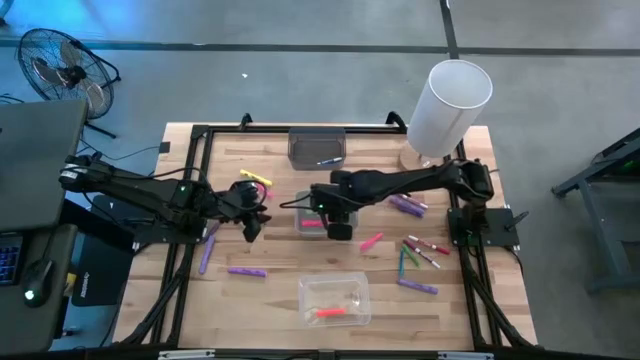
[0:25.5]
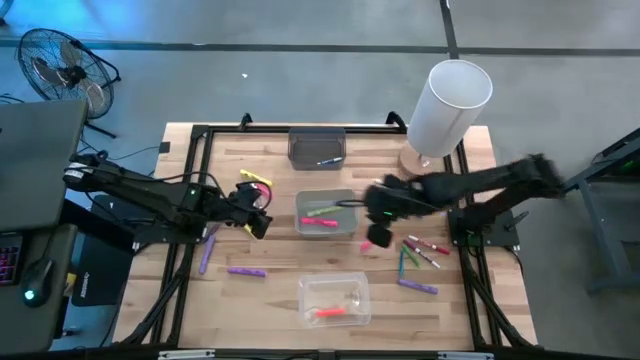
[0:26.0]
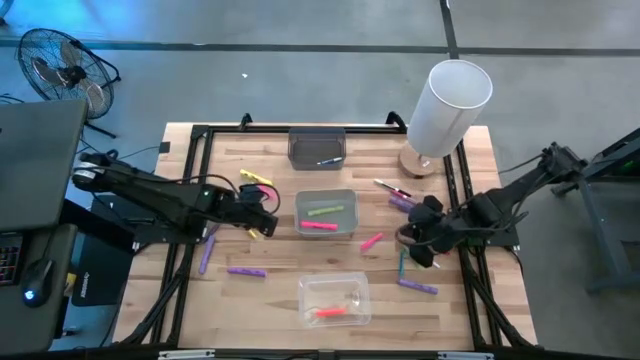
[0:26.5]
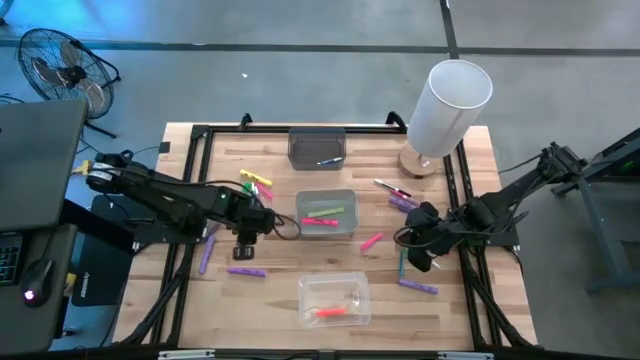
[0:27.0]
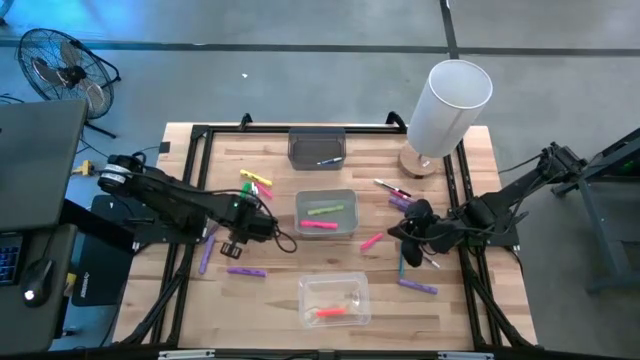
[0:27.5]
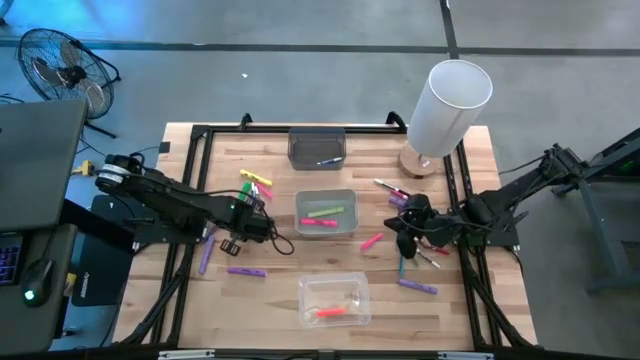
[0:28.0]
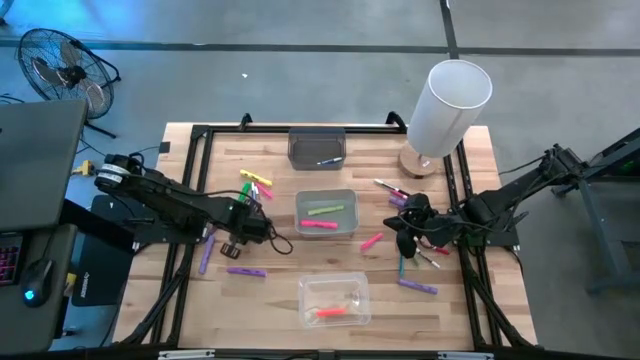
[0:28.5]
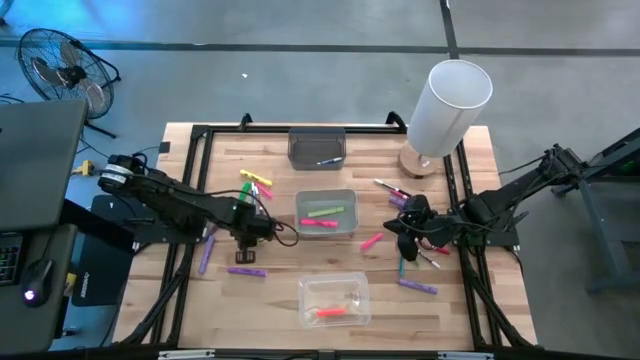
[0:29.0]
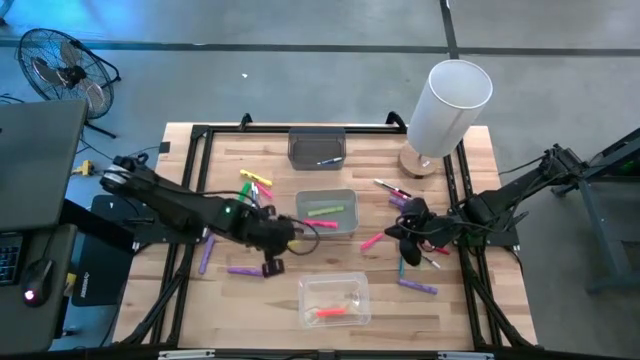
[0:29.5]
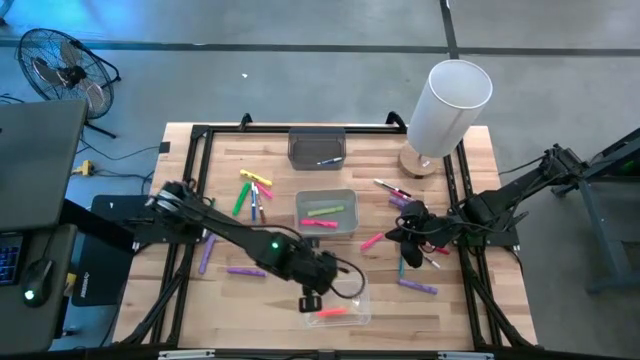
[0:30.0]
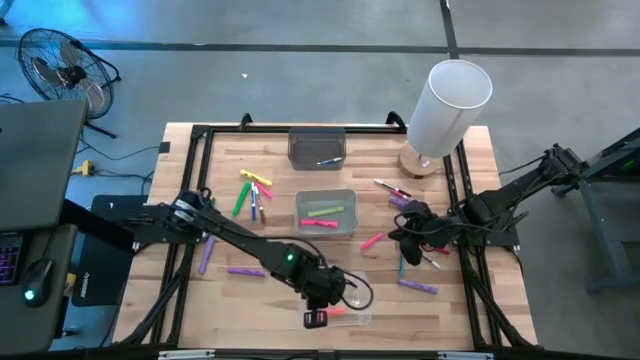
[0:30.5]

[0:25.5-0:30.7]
Task: Pick & Place Markers
Put the yellow pen into the transparent bin

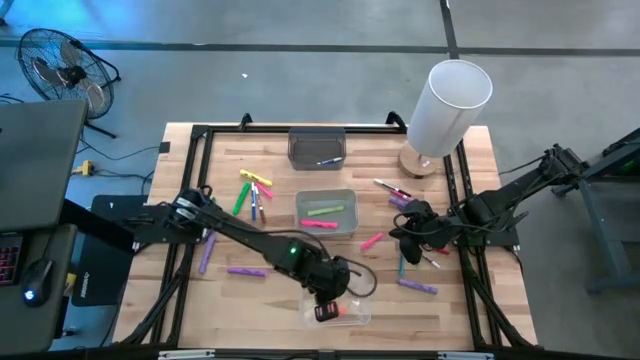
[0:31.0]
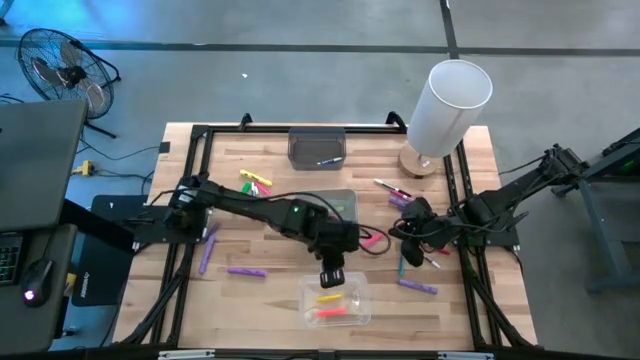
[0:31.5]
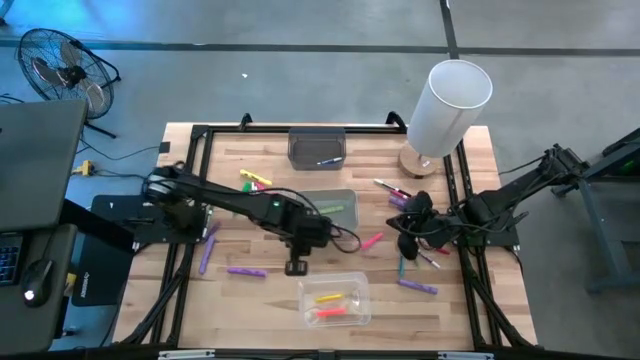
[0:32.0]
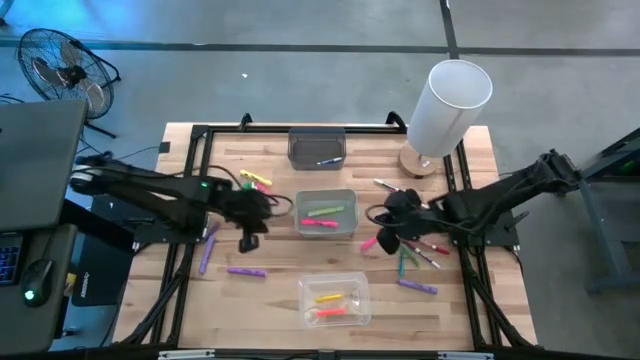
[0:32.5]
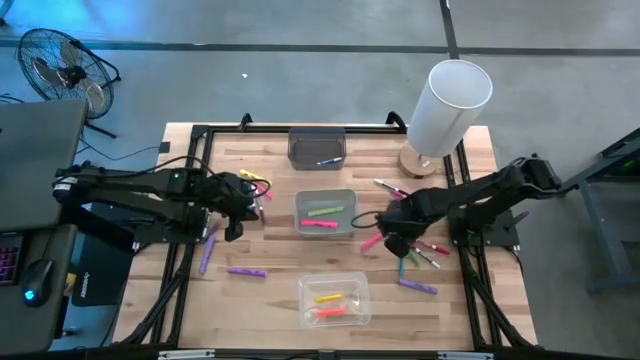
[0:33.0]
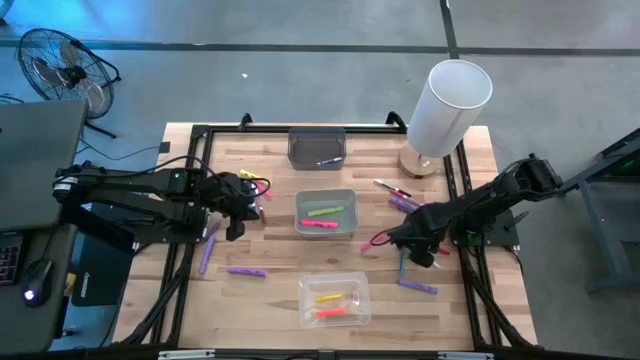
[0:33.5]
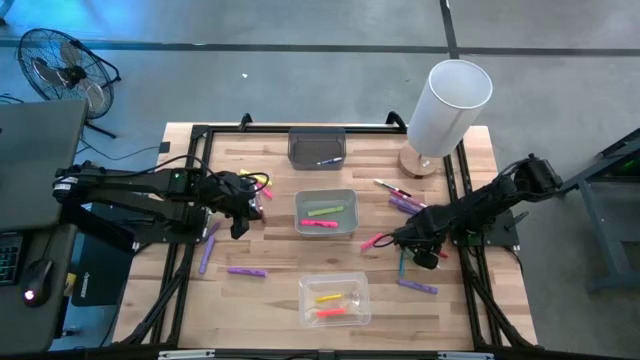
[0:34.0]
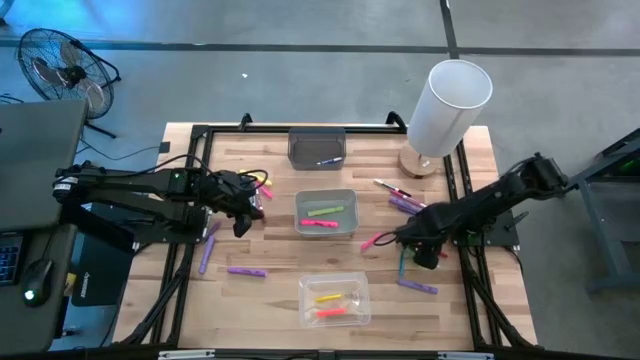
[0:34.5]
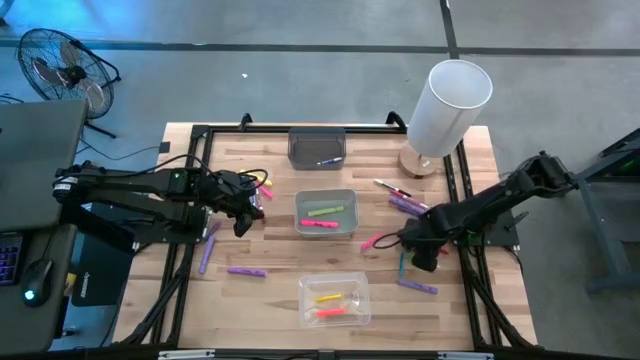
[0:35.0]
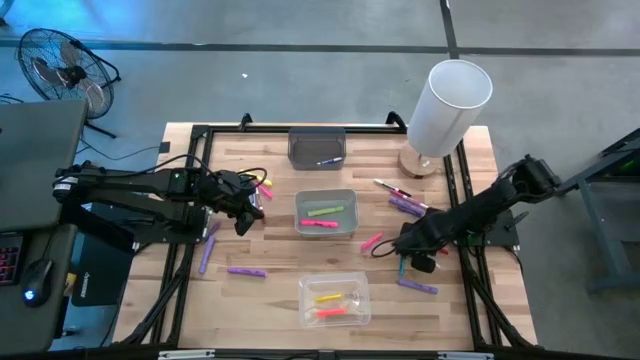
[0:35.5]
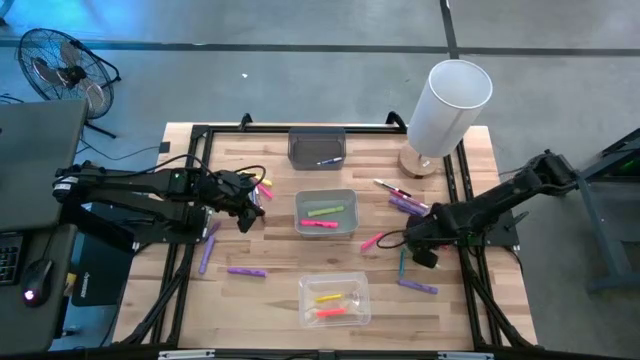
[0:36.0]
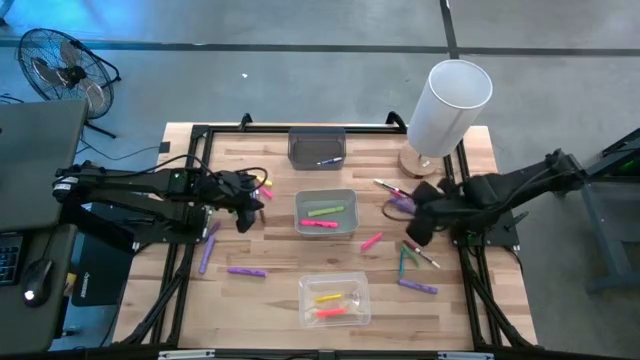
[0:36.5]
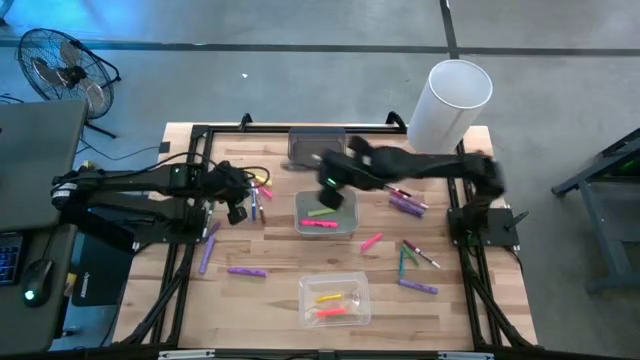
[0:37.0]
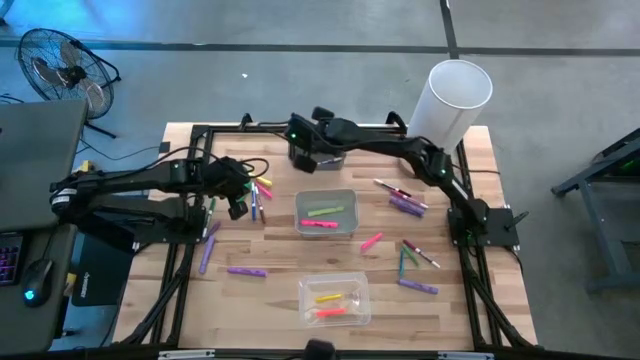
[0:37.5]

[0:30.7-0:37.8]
Put the red marker pen into the black bin

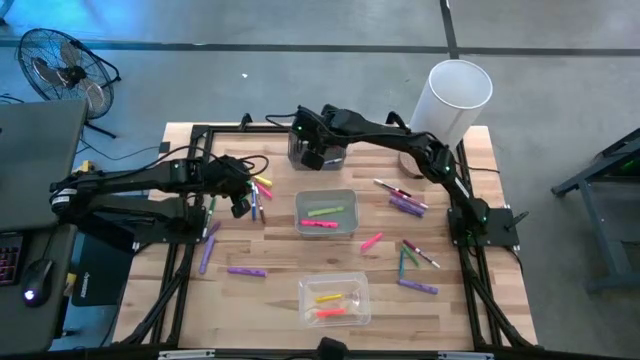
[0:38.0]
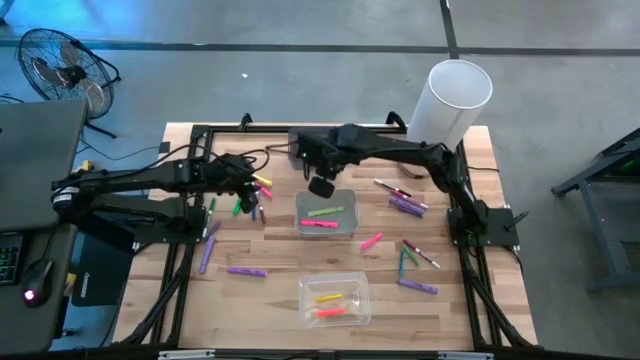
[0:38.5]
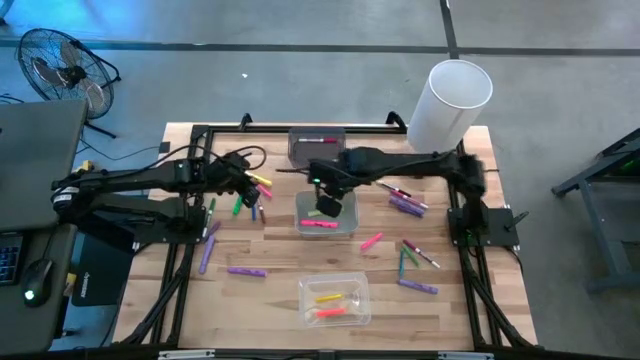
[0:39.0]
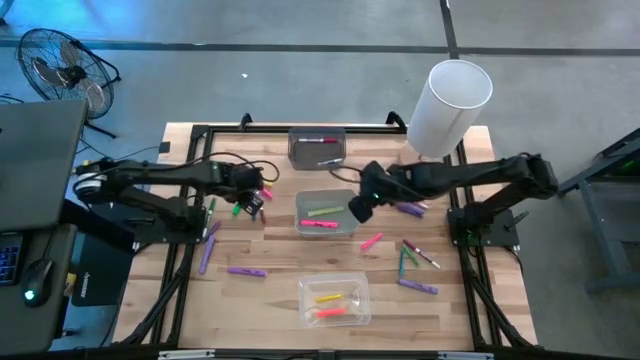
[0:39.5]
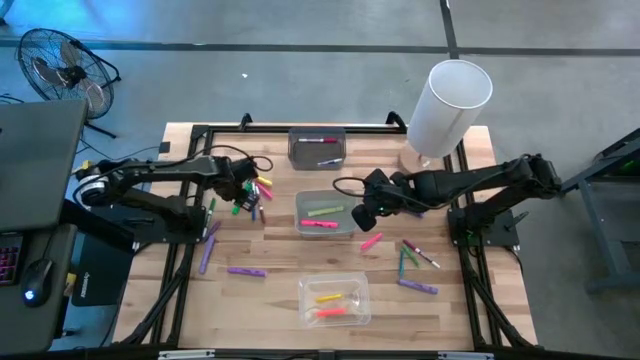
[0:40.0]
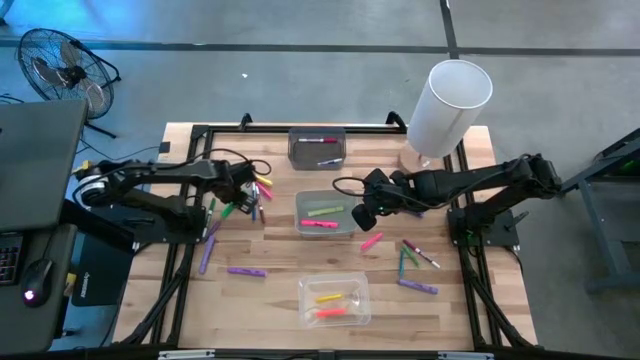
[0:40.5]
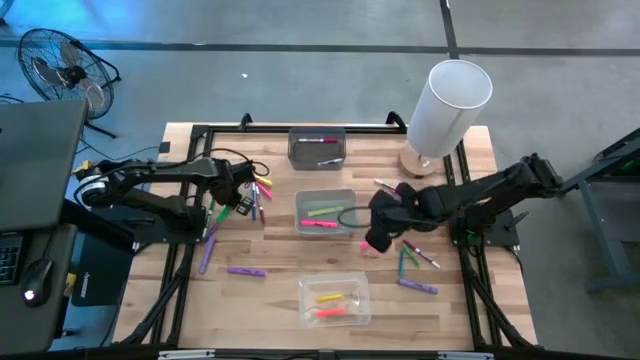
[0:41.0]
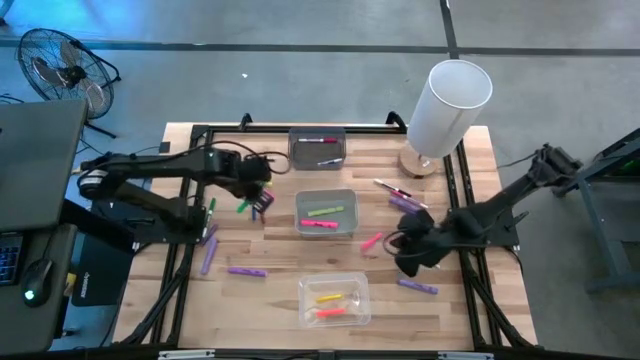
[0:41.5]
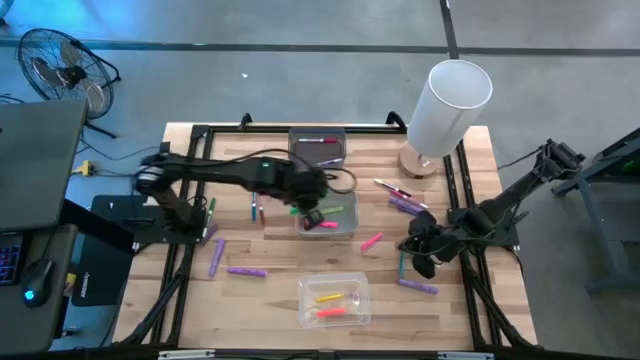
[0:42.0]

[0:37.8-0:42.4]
Put the green highlighter pen into the gray bin

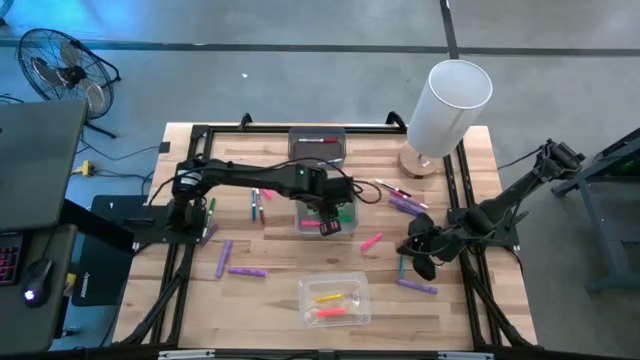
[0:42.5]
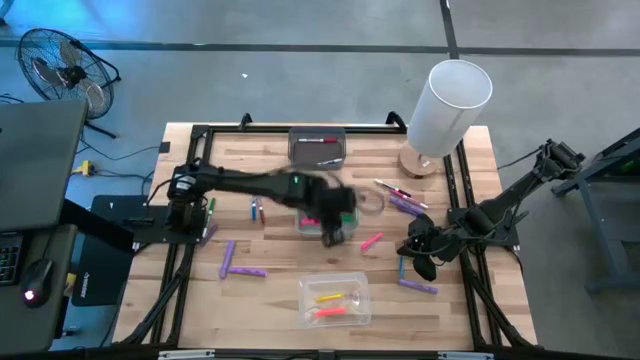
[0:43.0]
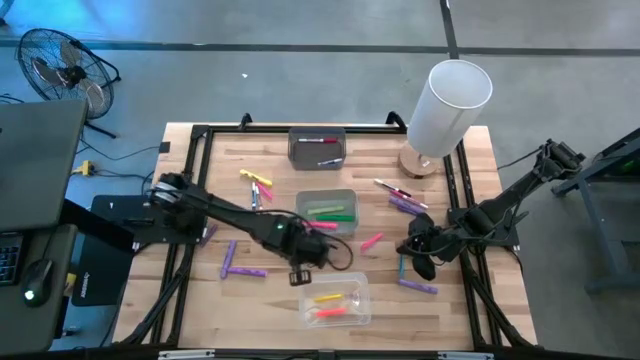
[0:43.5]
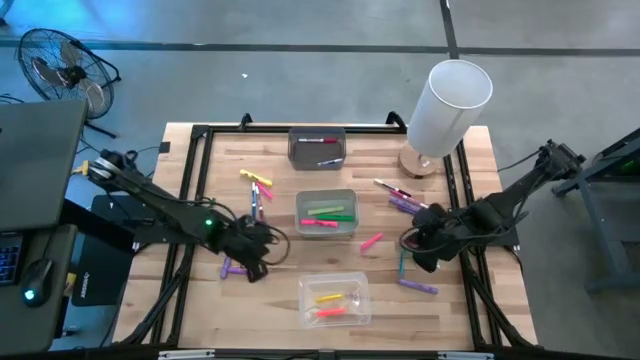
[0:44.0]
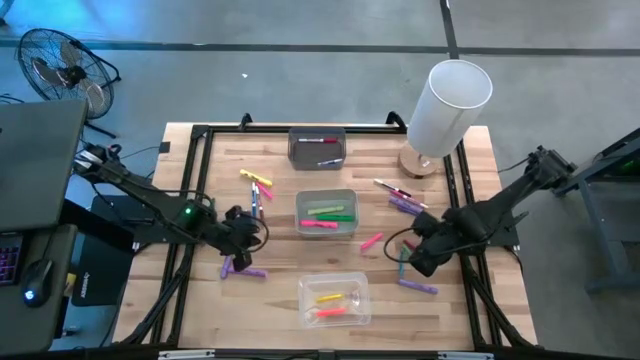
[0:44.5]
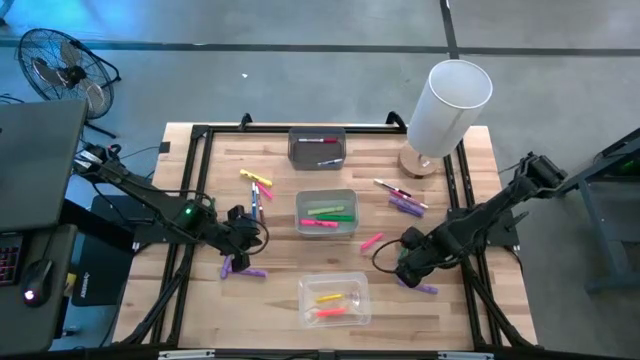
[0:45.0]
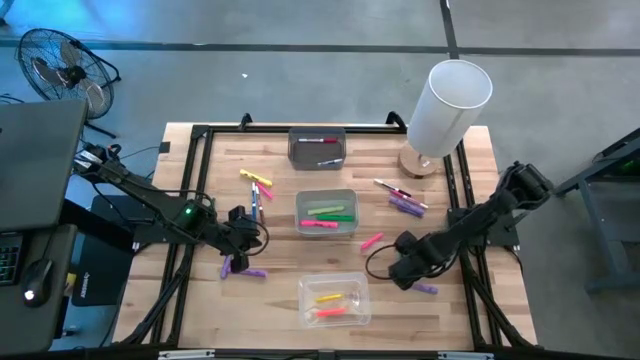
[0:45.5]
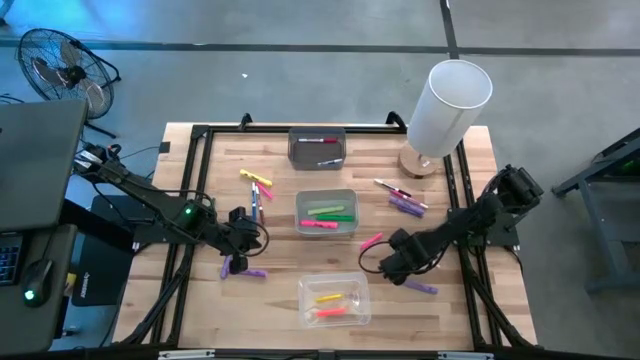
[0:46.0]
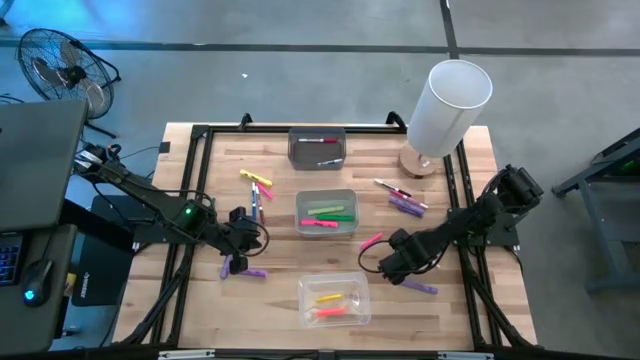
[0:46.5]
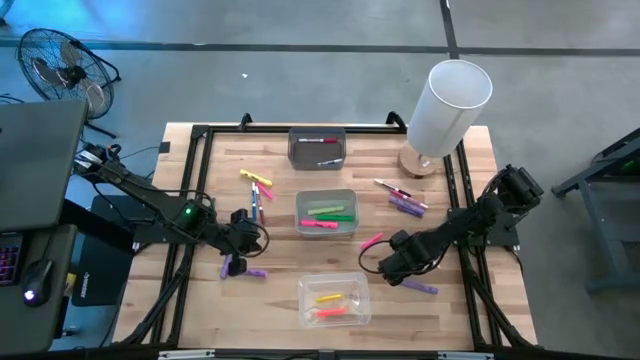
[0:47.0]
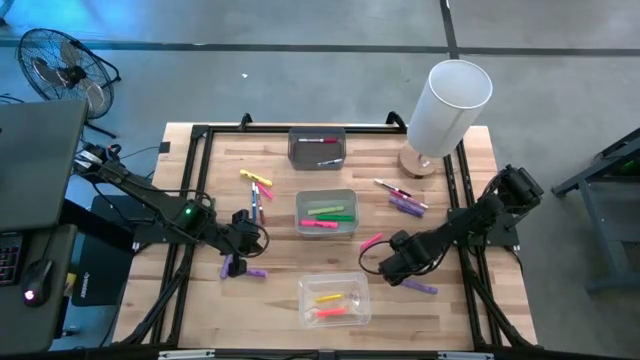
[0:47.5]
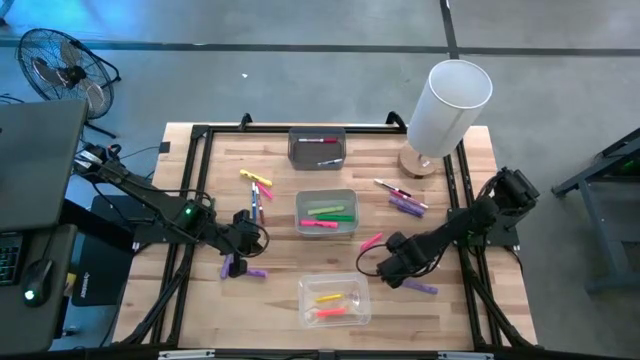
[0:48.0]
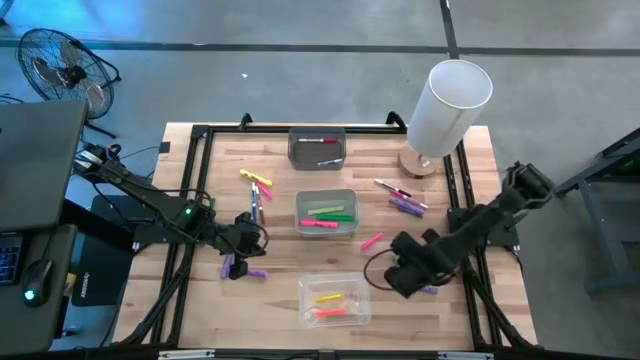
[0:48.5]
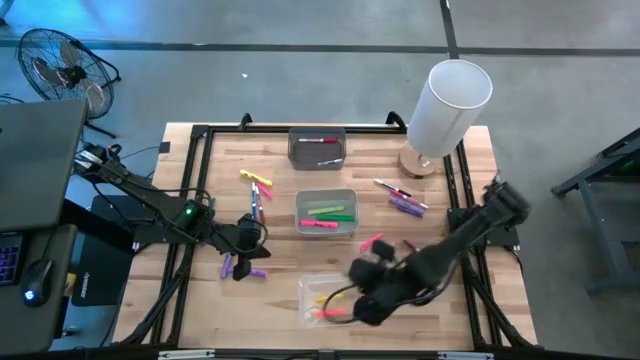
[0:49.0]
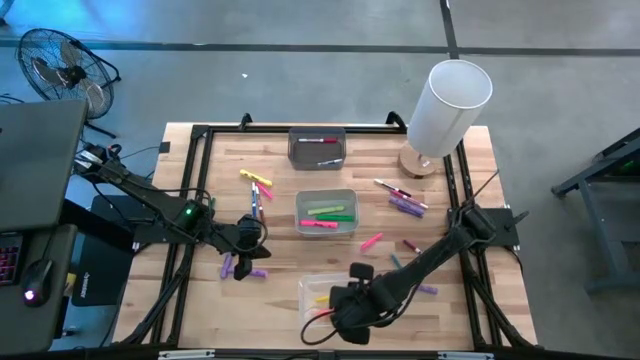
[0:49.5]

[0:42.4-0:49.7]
Put the green pen into the transparent bin
